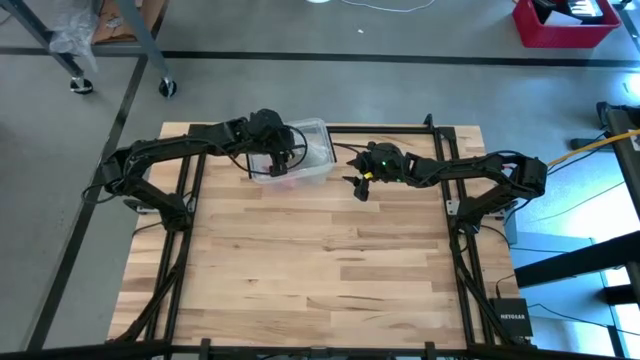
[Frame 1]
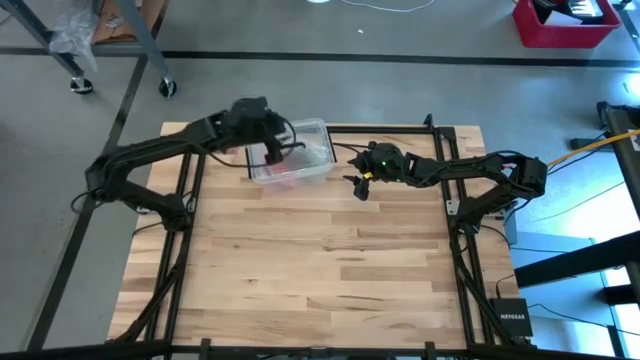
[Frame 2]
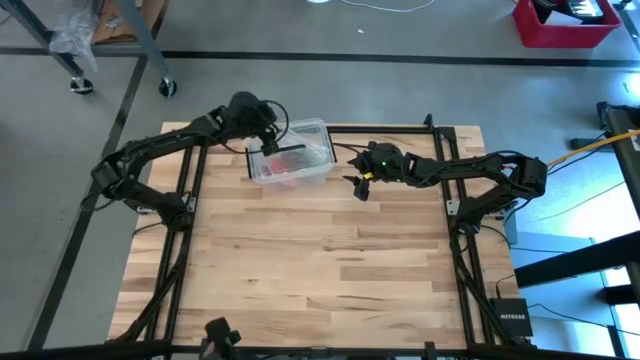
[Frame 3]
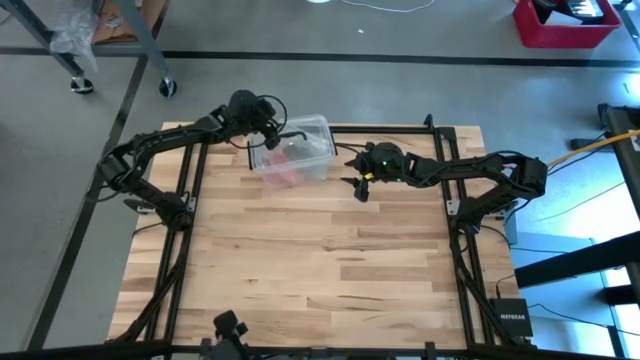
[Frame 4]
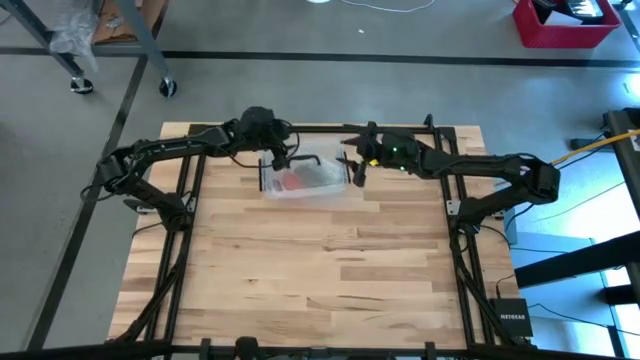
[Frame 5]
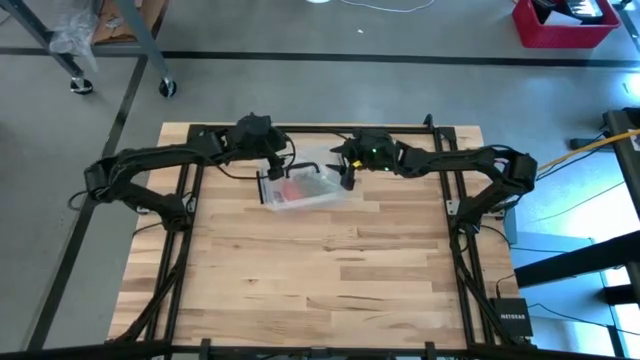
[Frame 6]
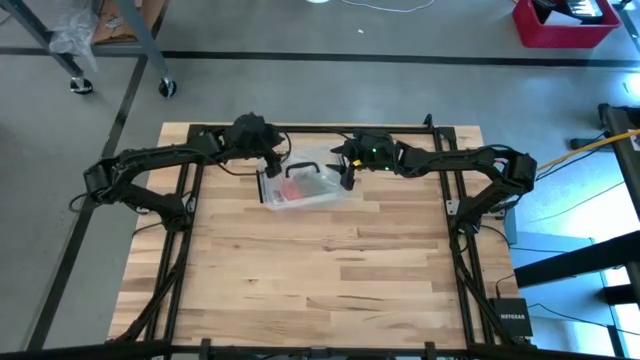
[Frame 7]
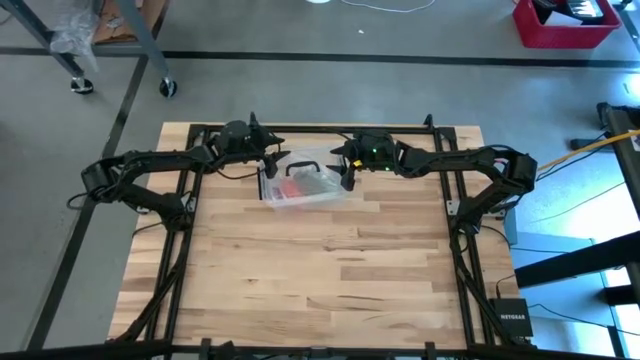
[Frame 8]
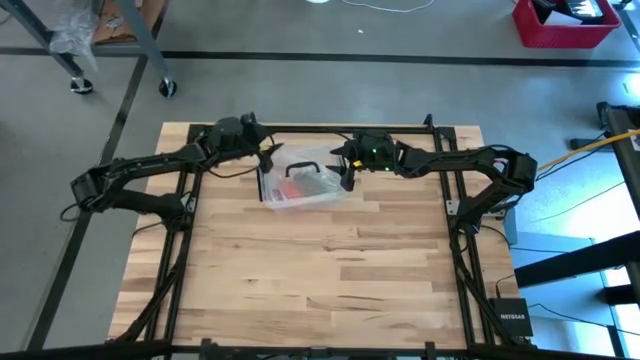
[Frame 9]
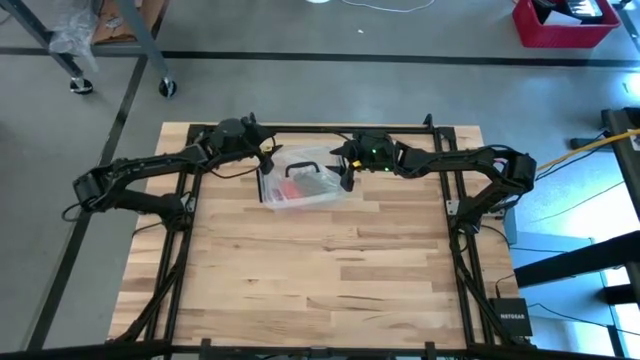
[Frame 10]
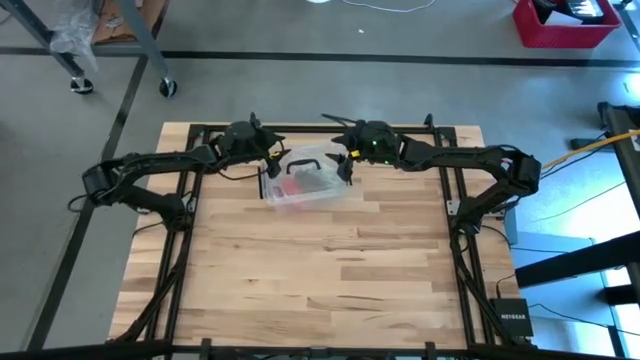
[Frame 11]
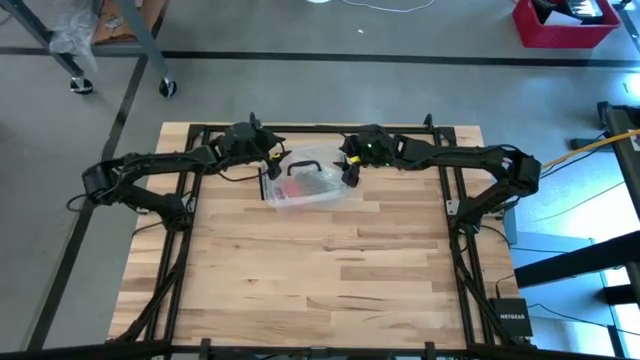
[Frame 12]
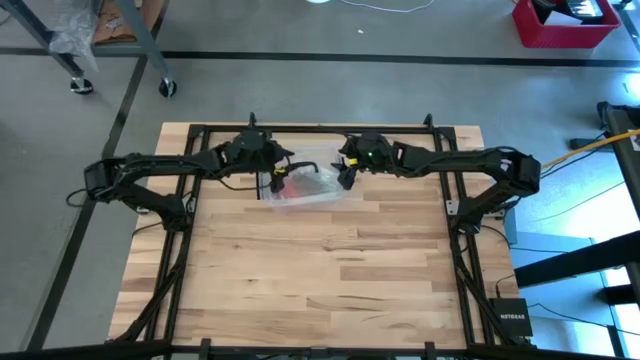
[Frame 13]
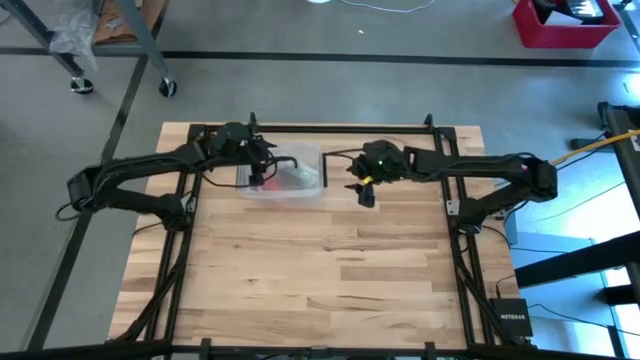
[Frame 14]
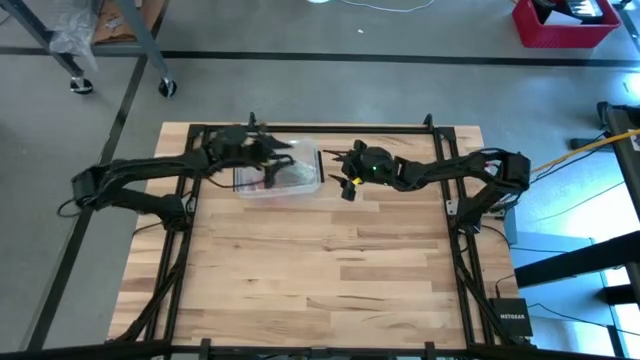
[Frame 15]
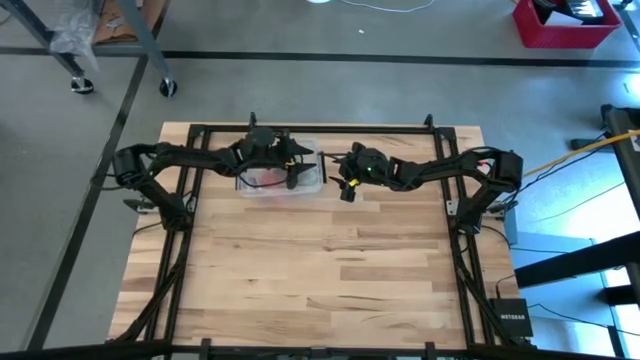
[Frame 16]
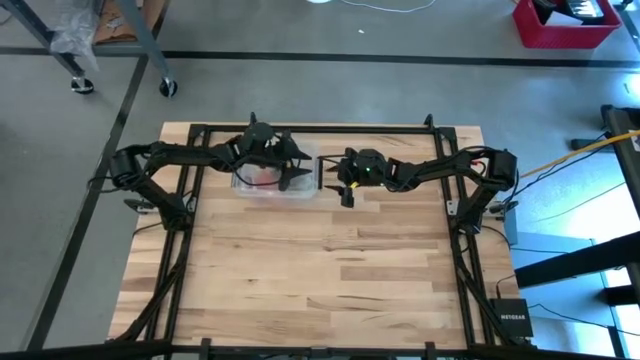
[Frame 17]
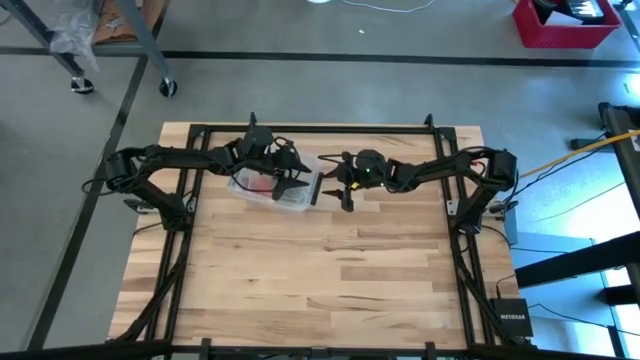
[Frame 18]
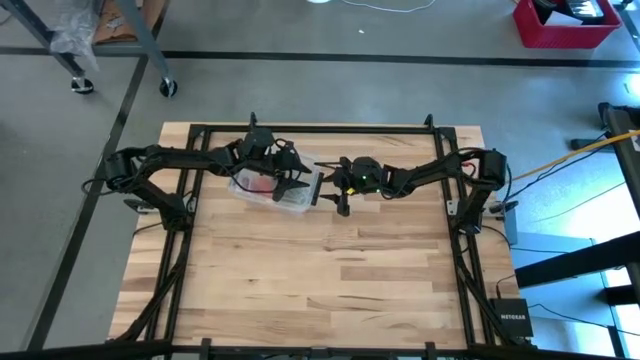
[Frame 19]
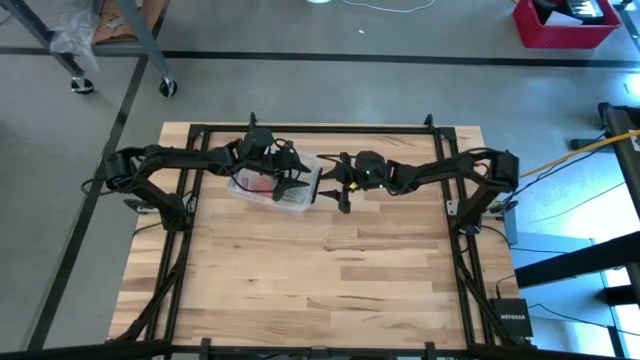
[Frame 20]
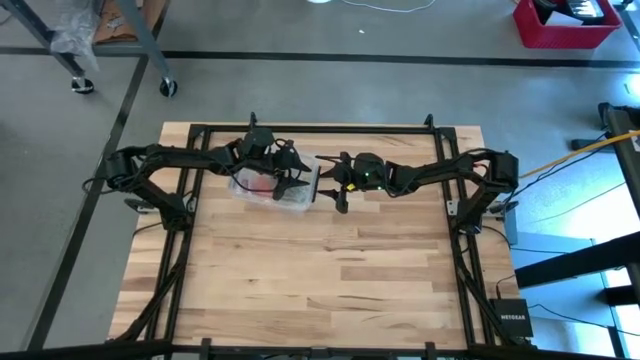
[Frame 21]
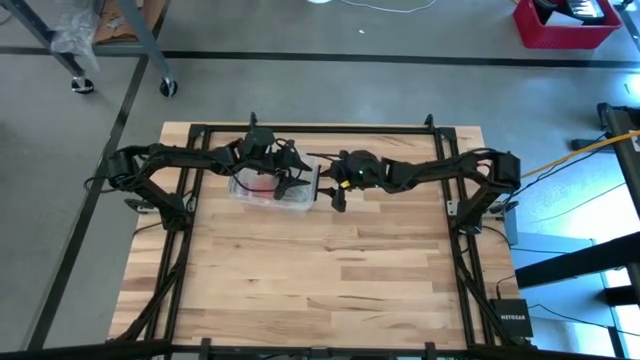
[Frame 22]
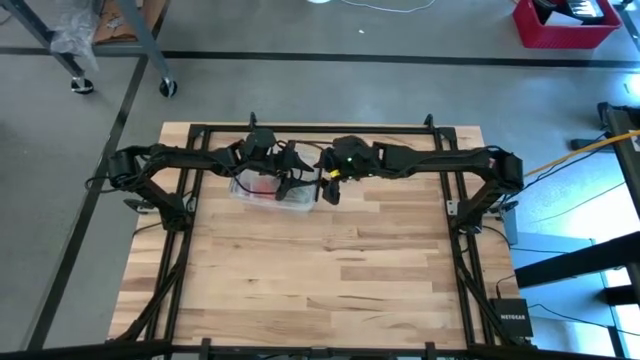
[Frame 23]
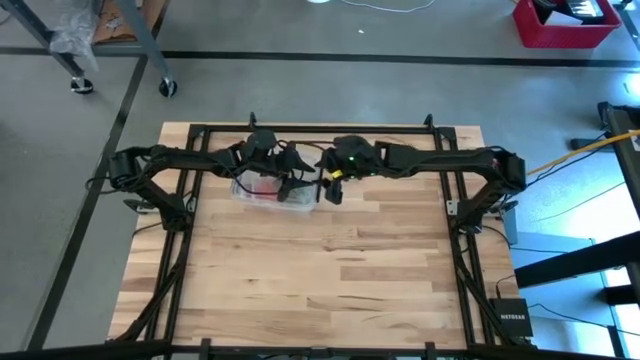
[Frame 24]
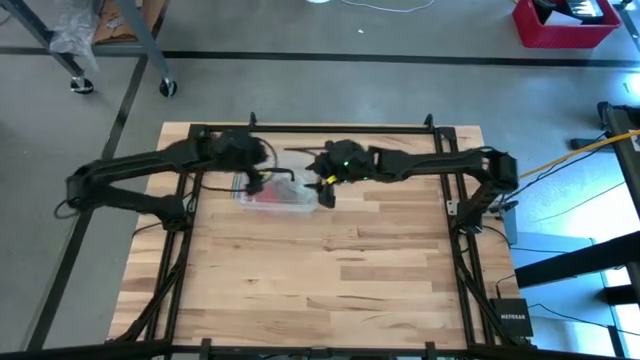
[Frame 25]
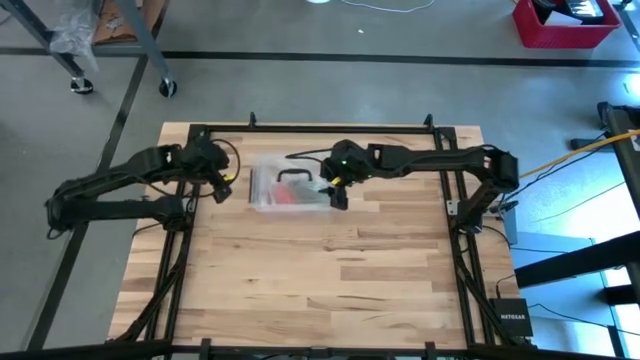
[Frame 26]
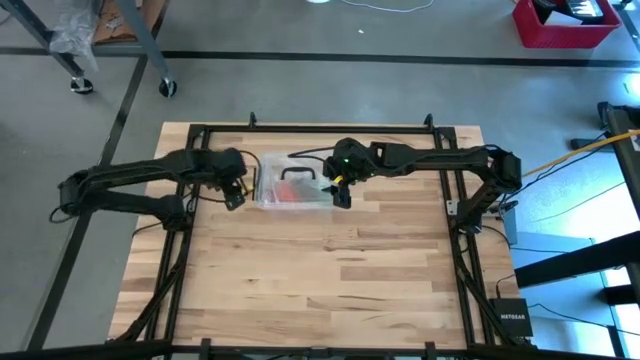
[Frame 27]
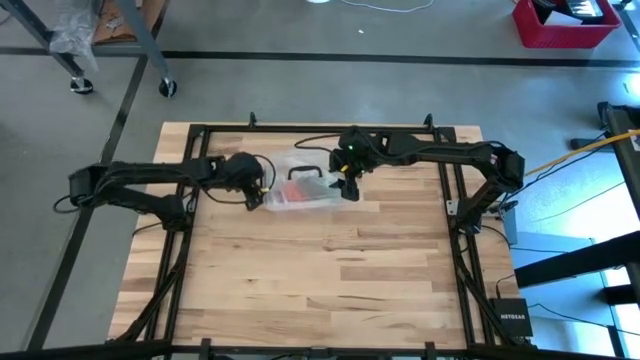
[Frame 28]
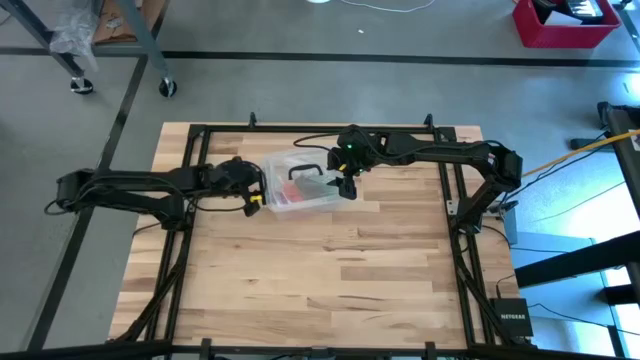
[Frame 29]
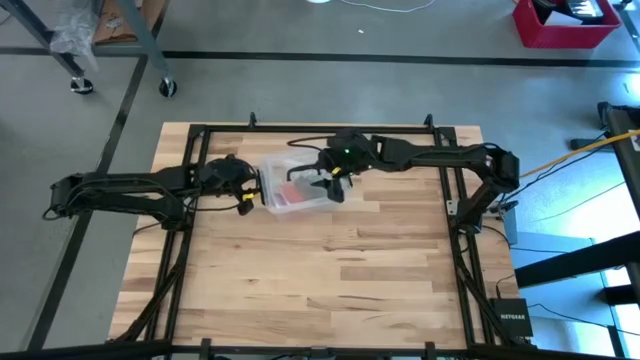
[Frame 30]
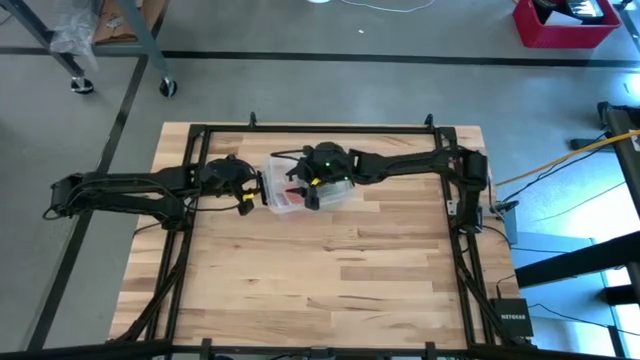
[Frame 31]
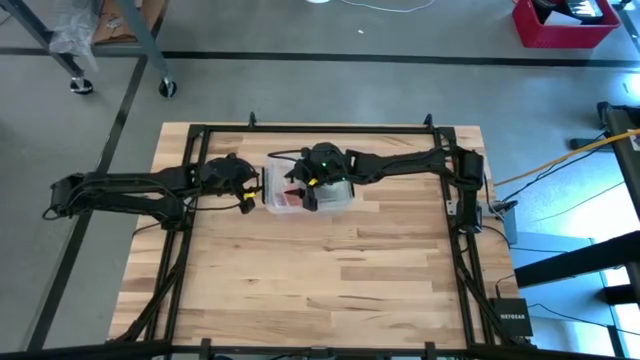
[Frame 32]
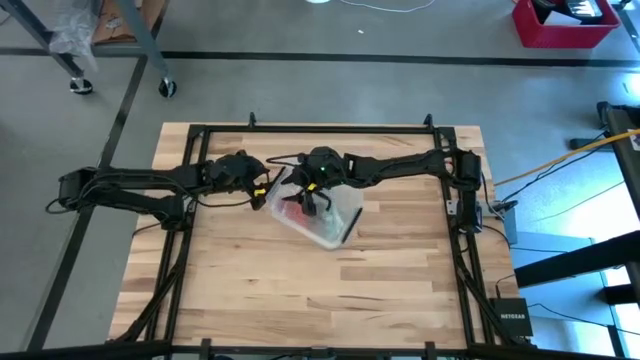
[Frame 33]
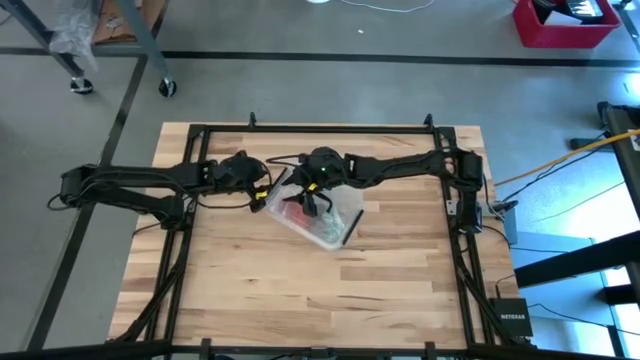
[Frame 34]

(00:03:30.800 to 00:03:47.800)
Task: Roll bandage
Close the transparent bin

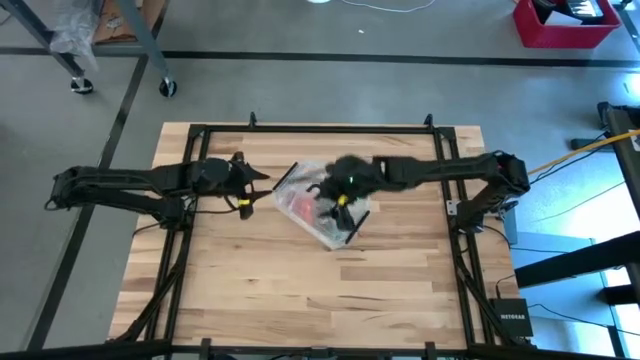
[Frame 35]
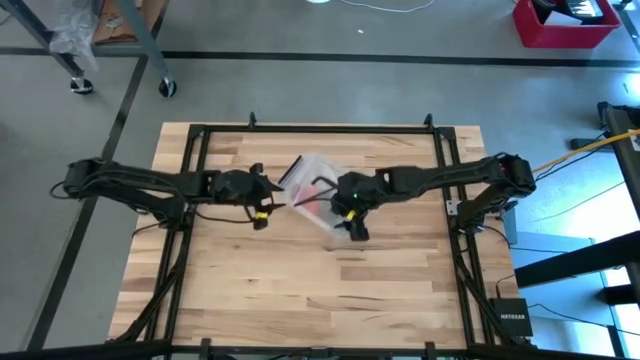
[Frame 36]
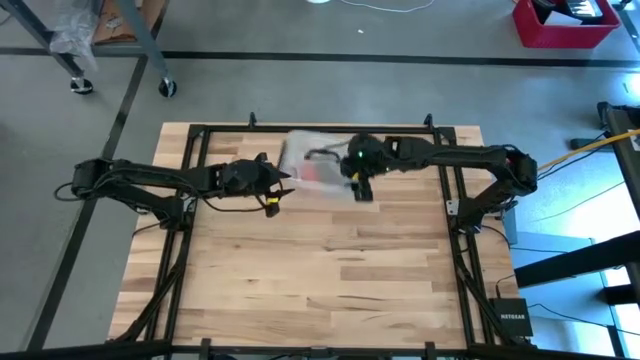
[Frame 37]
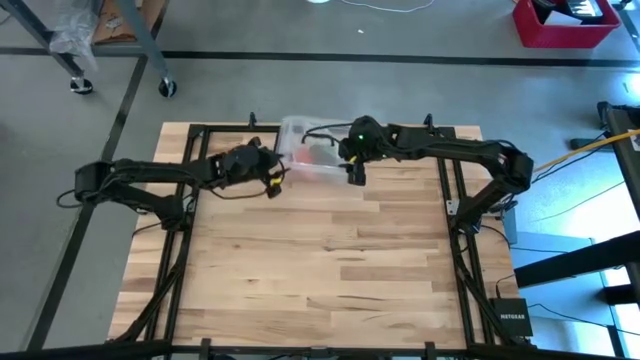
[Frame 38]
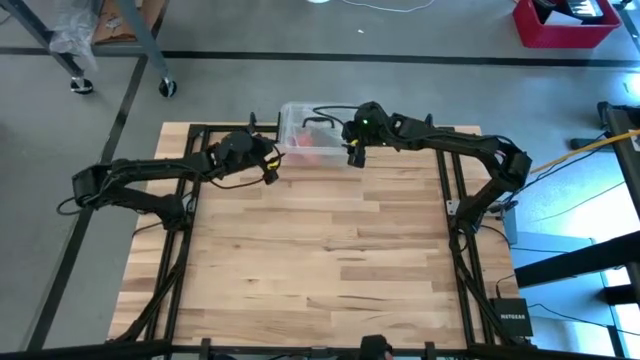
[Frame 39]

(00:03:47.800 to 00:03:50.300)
Move the transparent bin to the upper middle of the table

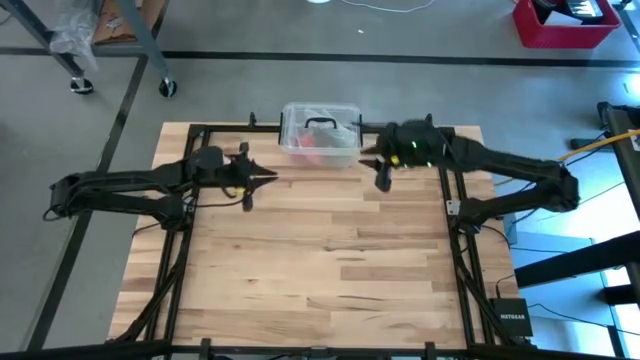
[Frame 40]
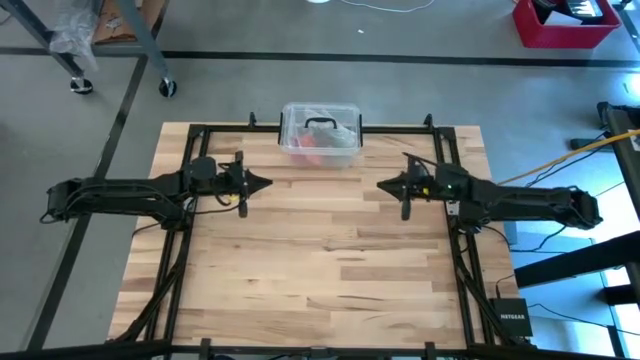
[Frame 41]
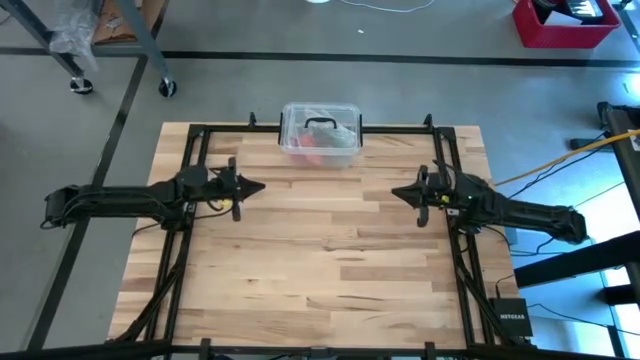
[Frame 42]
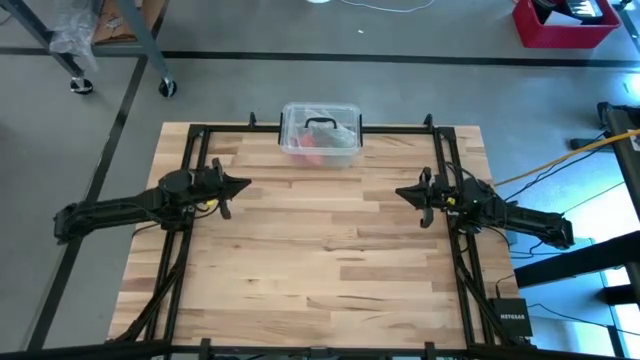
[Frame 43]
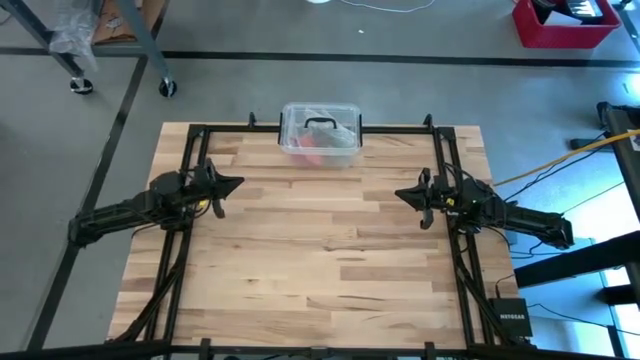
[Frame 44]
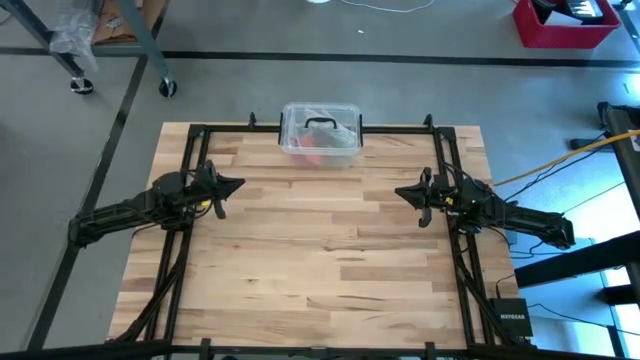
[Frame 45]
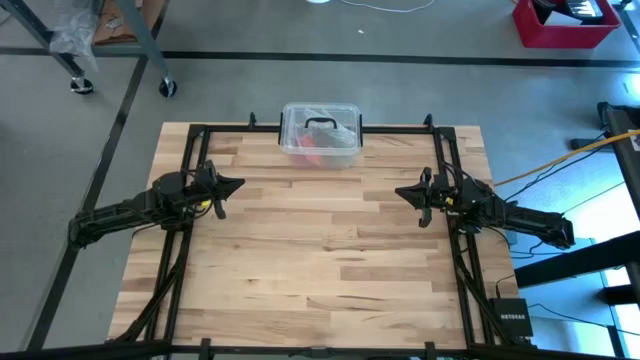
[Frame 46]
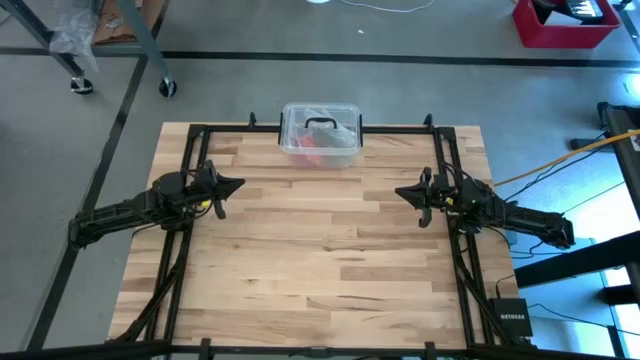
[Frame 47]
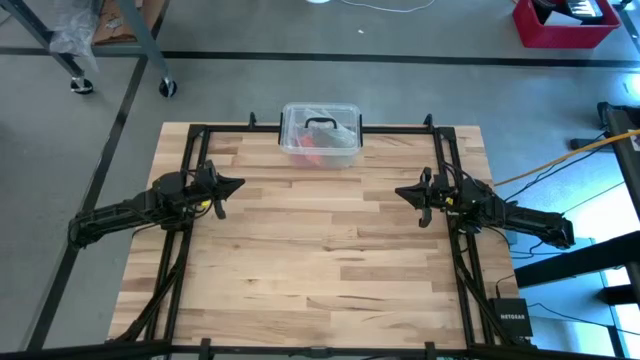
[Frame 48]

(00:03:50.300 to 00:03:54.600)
Return to Home Position
